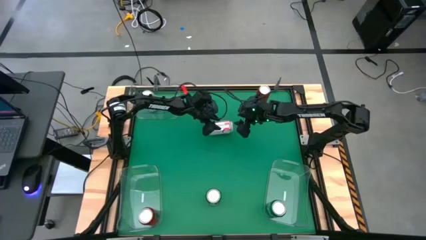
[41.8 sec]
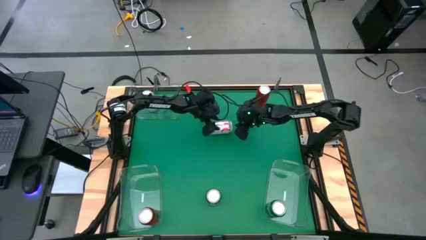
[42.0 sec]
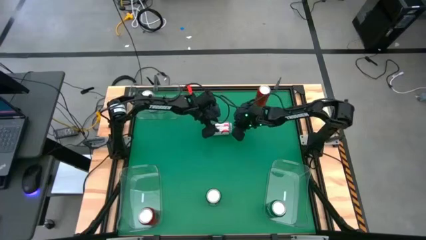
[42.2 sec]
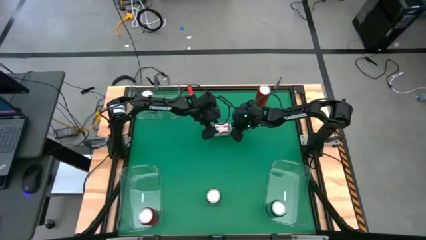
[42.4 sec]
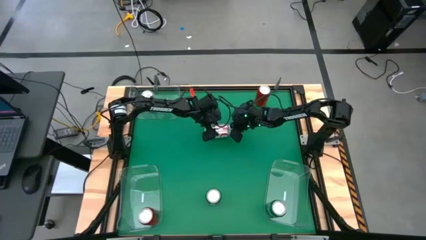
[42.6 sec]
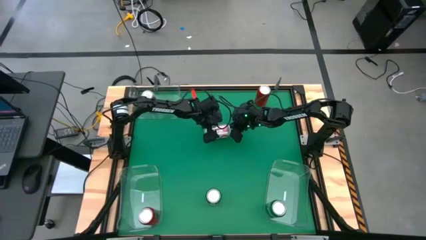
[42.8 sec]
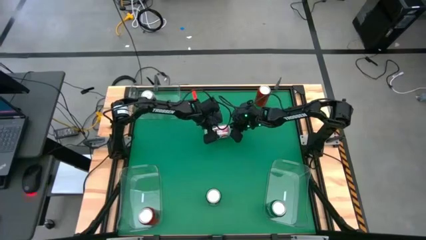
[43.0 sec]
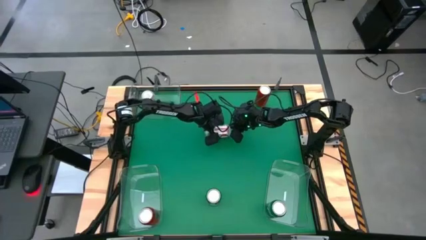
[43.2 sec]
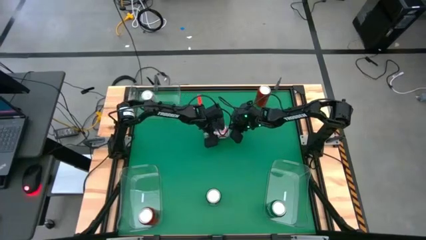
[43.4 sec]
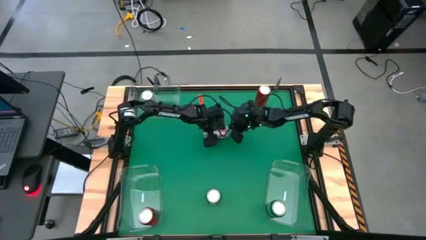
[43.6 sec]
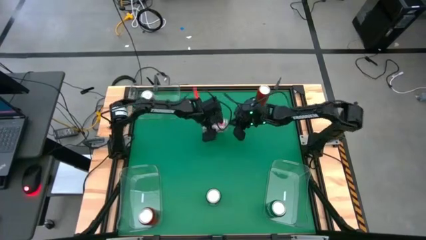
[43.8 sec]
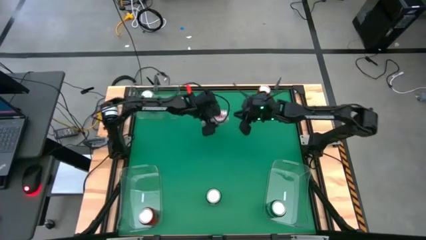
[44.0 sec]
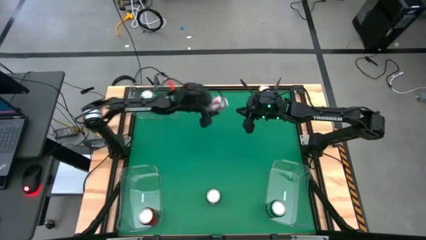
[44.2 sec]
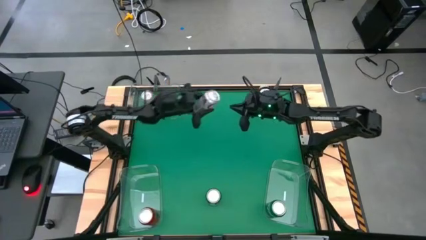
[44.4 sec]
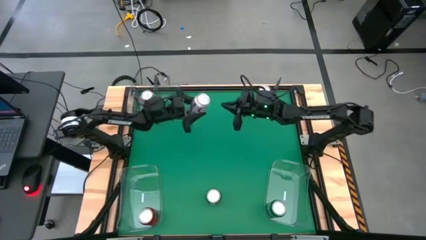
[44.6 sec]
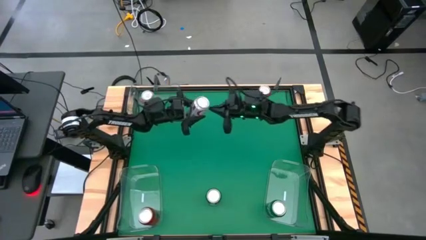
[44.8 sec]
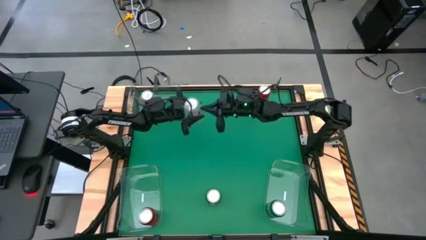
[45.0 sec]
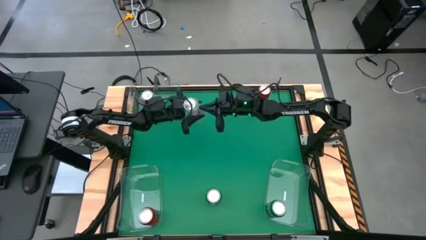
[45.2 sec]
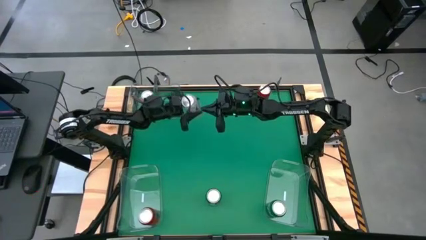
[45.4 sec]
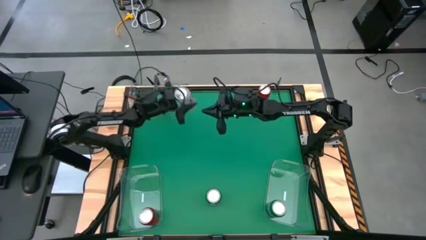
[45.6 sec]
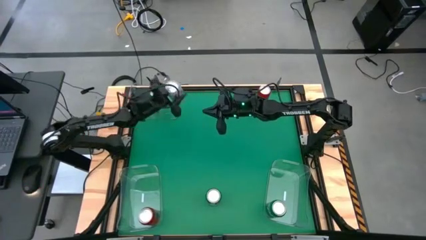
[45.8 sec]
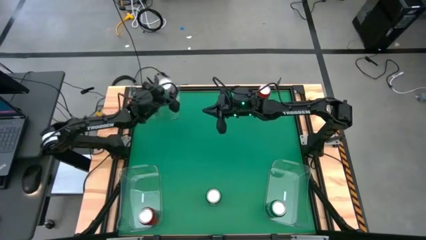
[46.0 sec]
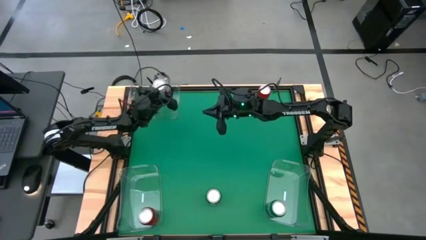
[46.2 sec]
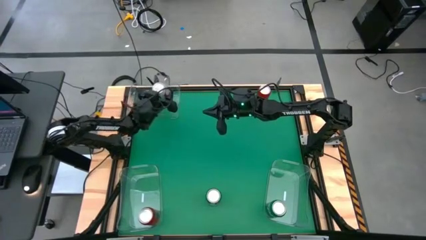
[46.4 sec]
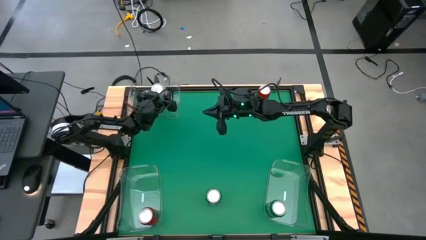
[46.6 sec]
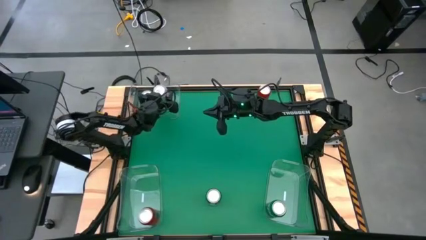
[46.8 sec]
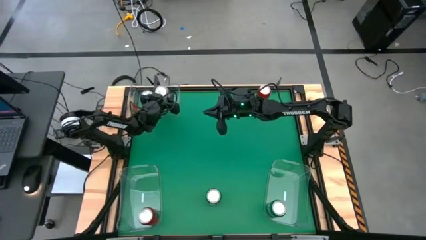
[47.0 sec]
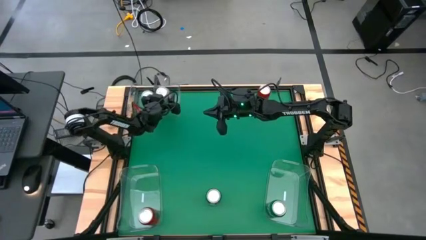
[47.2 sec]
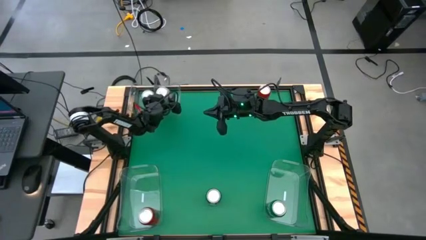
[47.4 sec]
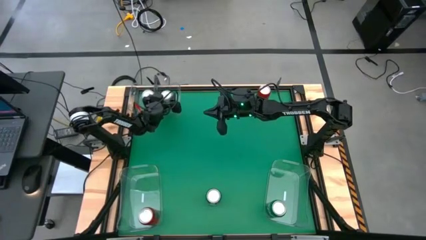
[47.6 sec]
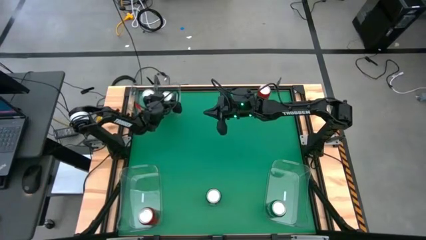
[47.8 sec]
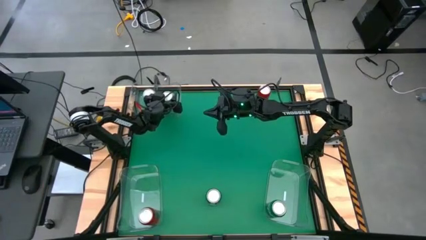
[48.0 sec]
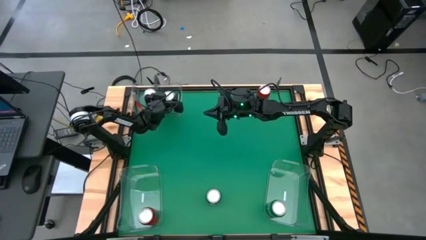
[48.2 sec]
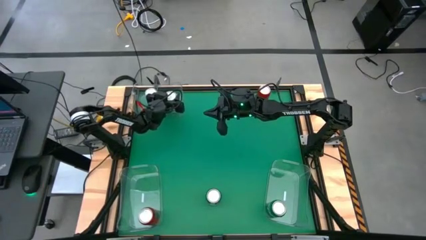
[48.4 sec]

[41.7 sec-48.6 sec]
Task: Sort soda cans
Put the red-silver soda can into the top transparent bin

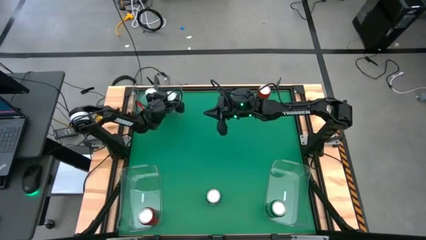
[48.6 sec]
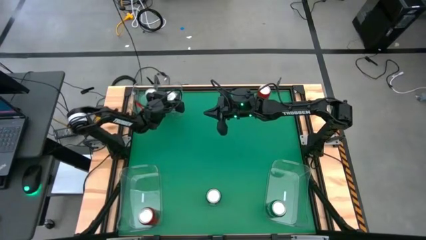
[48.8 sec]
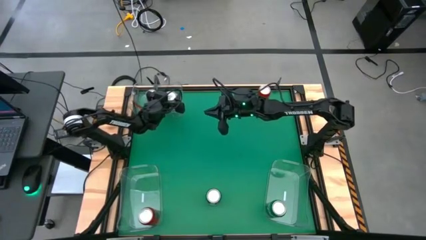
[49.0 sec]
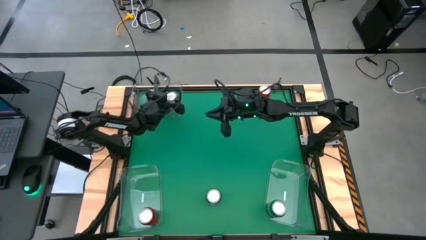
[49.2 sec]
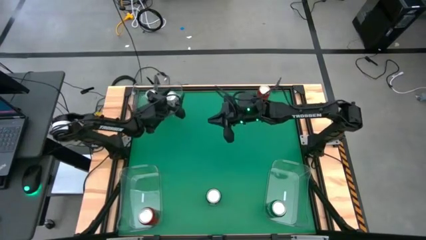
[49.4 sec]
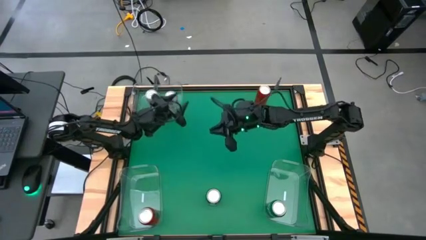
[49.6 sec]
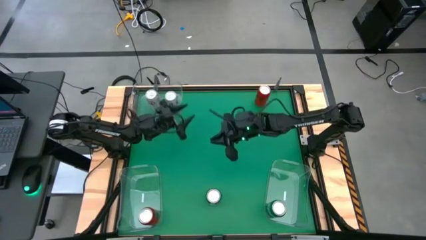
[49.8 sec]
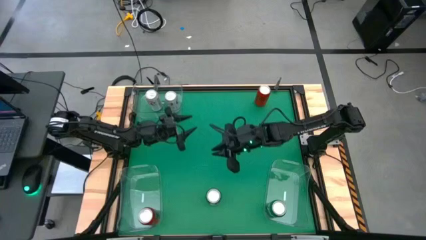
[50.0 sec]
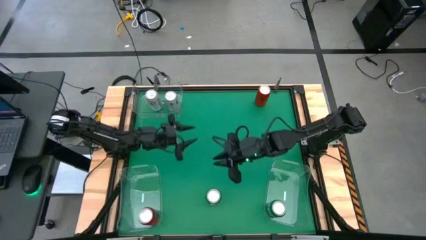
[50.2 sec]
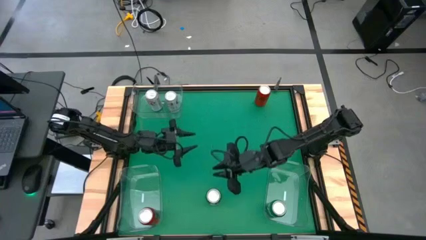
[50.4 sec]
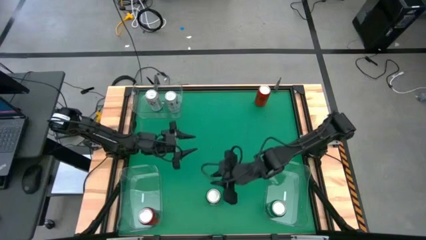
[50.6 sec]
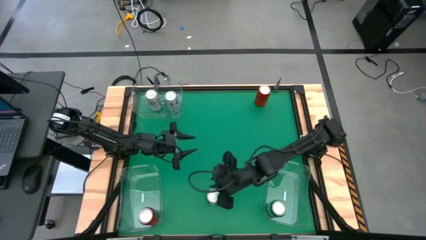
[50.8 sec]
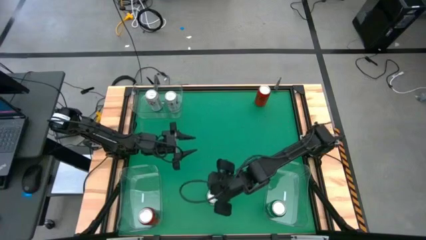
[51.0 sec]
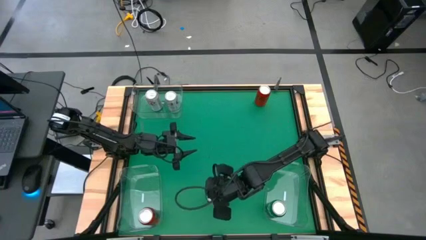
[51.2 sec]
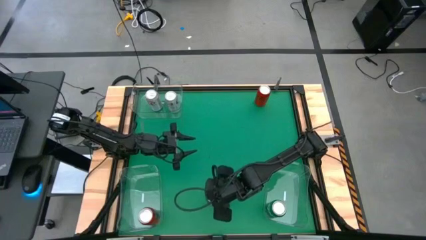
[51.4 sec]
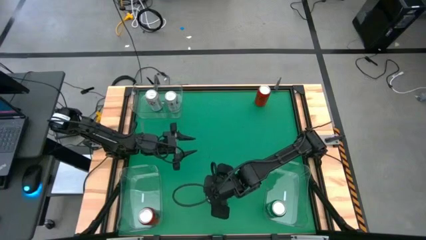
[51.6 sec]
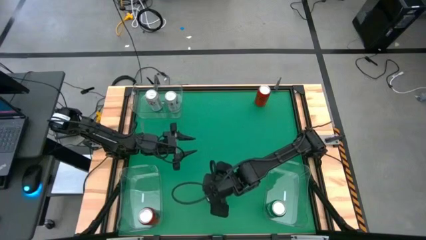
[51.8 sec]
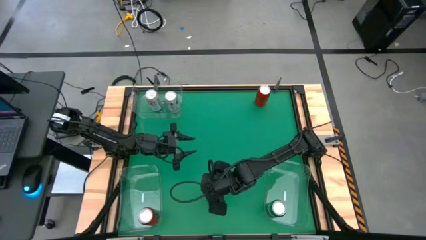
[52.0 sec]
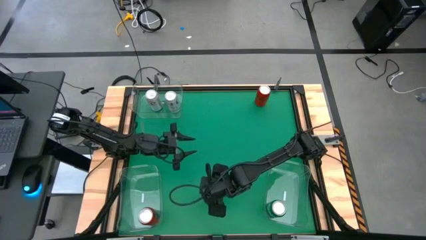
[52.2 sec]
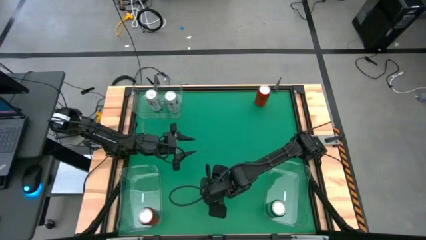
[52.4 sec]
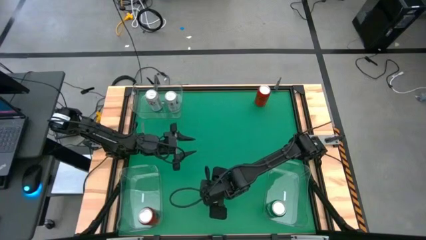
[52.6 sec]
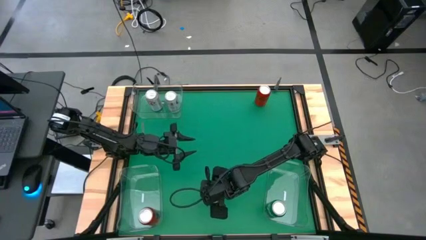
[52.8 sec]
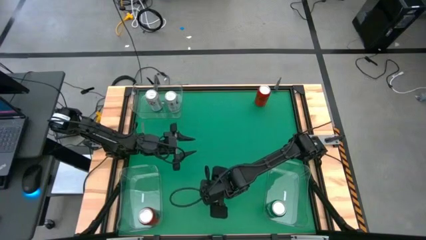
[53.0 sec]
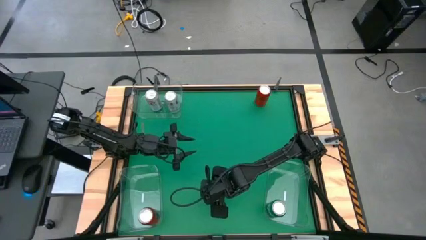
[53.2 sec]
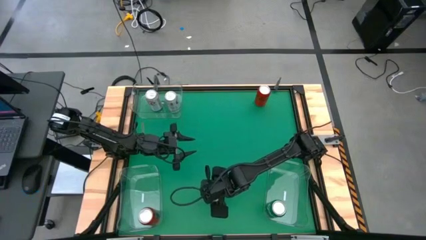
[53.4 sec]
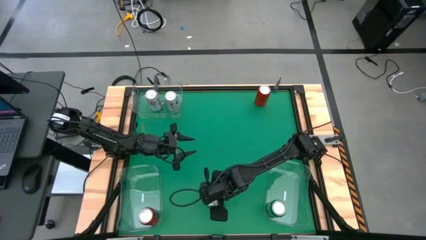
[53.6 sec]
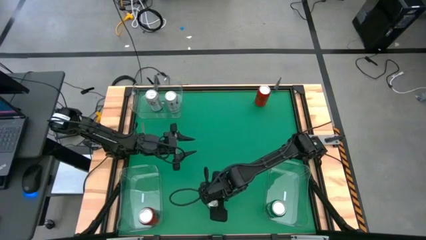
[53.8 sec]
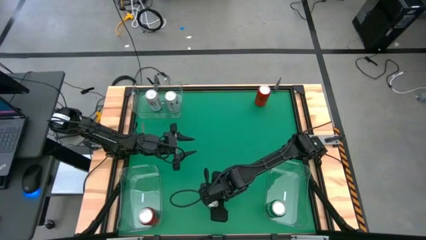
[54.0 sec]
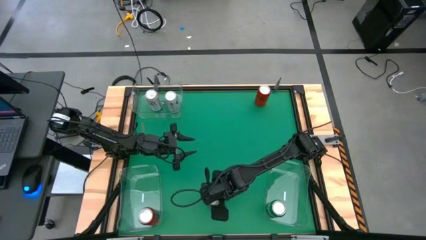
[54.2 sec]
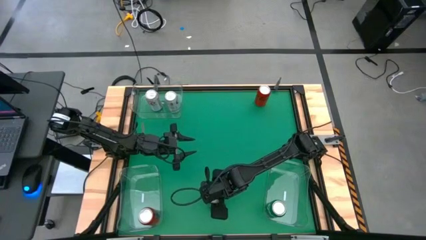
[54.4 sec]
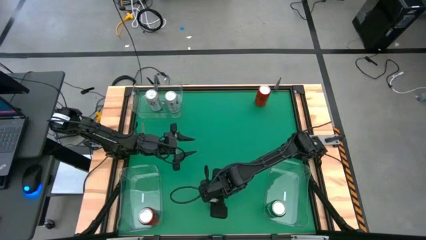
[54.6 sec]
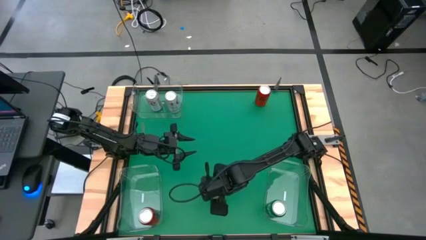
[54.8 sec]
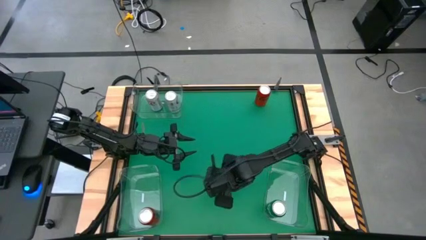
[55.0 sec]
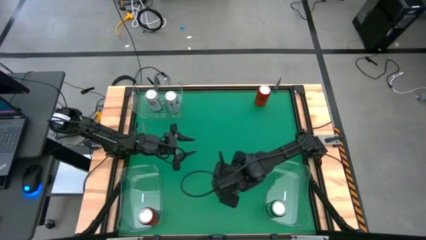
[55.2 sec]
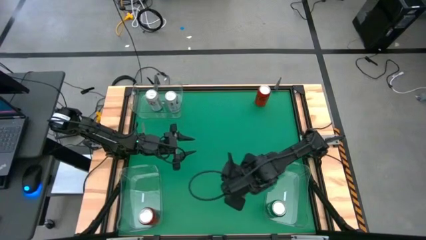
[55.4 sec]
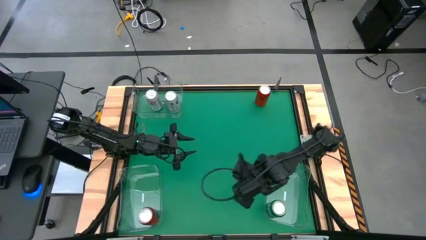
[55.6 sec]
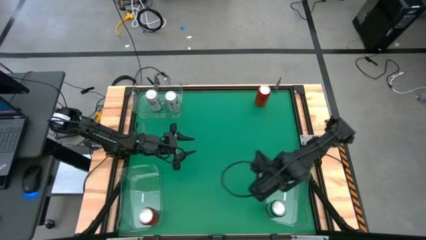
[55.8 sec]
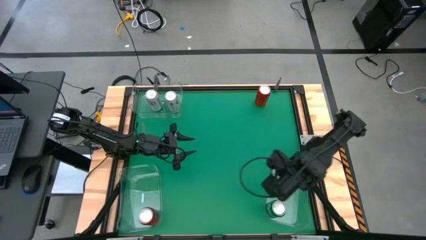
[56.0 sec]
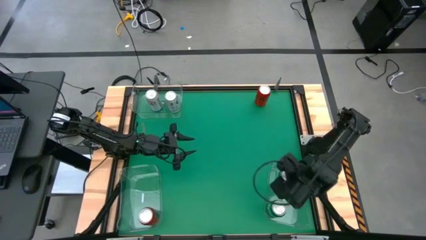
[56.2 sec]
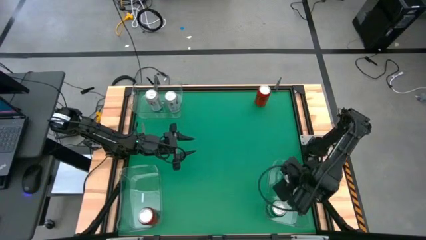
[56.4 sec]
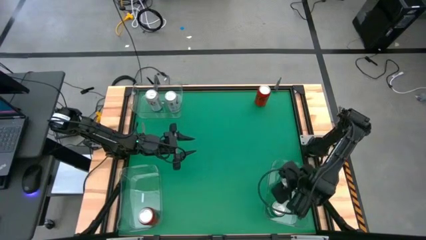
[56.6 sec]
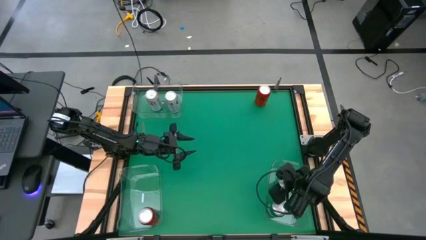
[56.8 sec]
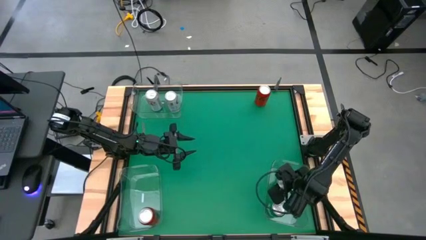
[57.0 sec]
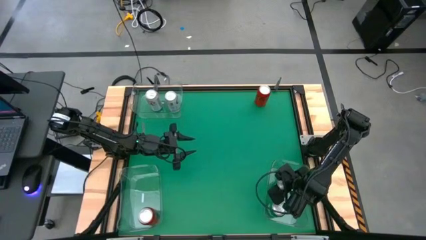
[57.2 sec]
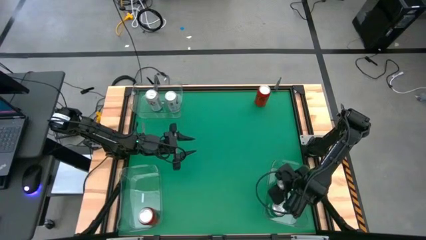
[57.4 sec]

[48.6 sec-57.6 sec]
Put the green soda can into the bottom right transparent bin
